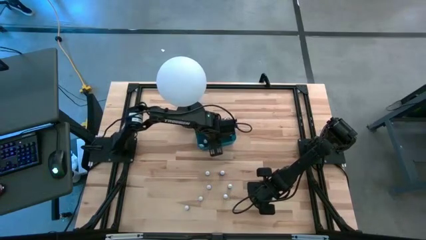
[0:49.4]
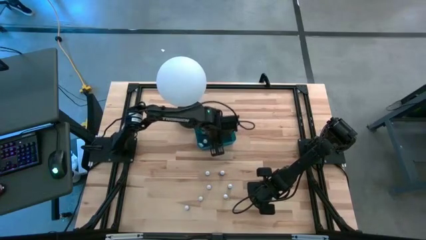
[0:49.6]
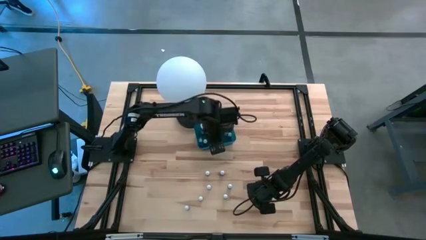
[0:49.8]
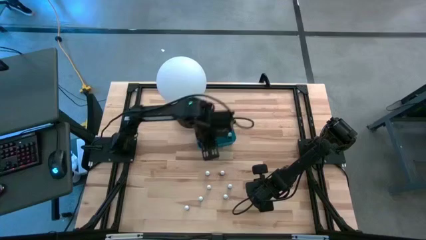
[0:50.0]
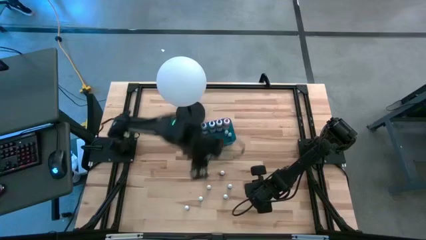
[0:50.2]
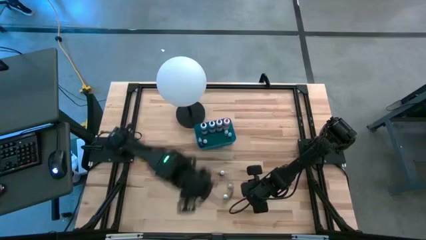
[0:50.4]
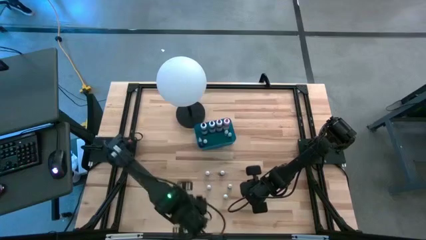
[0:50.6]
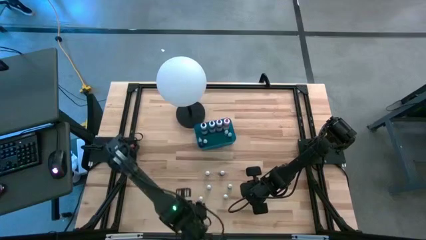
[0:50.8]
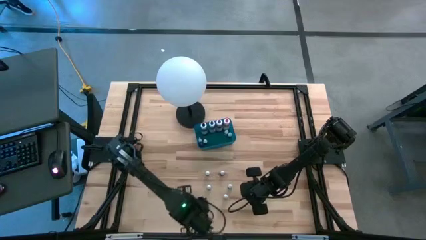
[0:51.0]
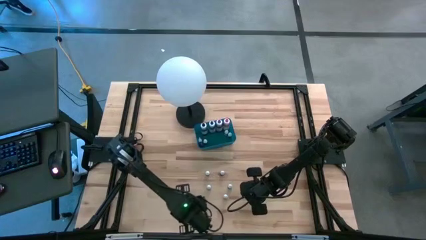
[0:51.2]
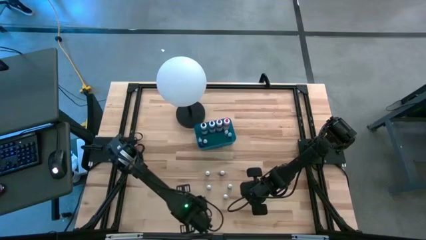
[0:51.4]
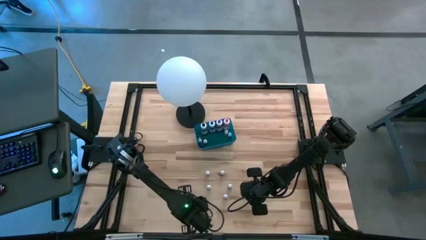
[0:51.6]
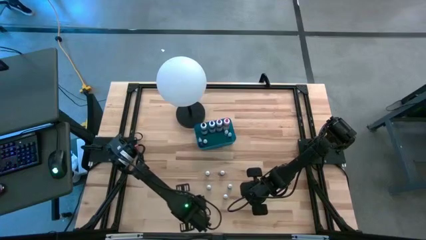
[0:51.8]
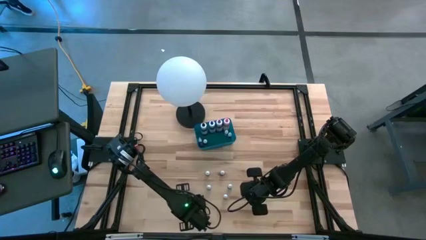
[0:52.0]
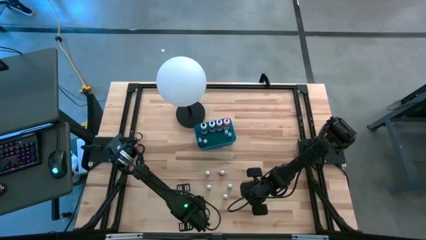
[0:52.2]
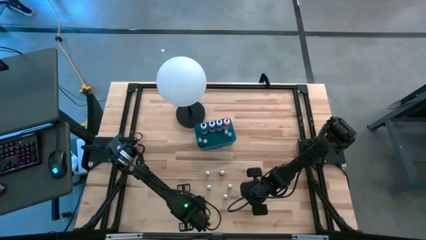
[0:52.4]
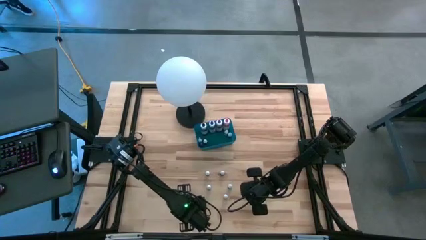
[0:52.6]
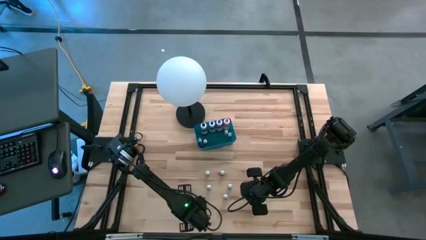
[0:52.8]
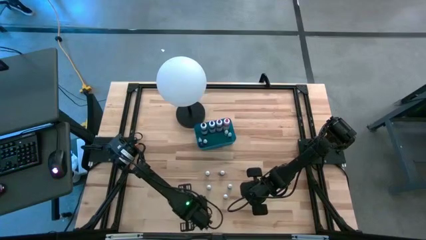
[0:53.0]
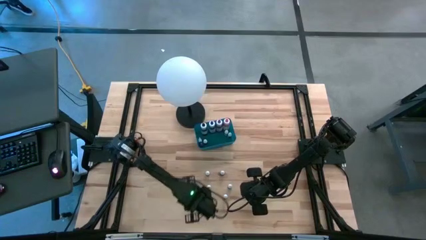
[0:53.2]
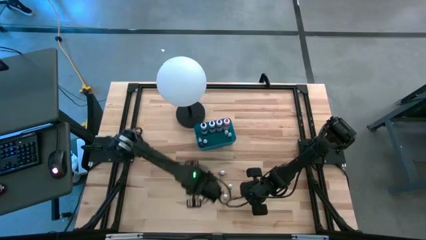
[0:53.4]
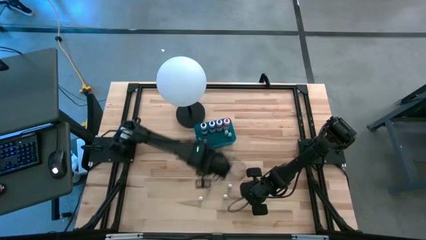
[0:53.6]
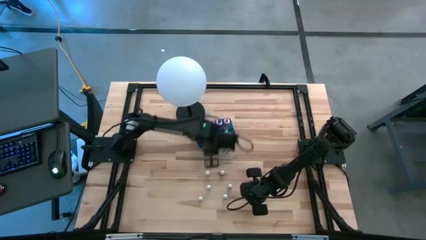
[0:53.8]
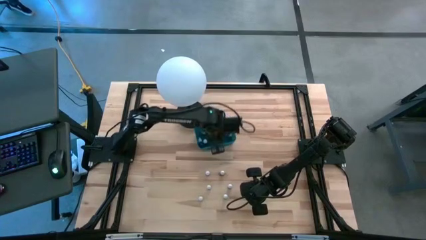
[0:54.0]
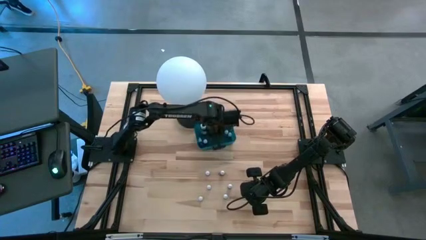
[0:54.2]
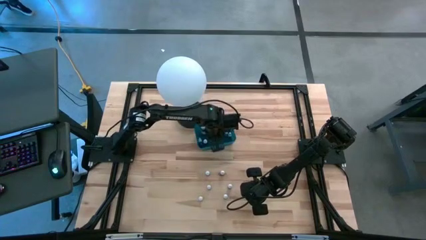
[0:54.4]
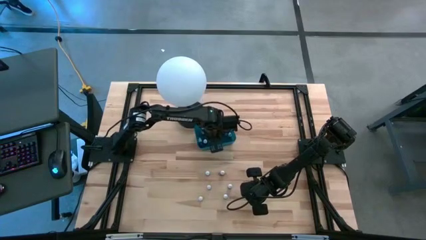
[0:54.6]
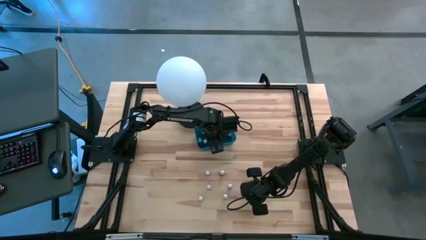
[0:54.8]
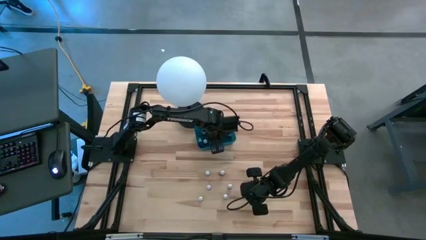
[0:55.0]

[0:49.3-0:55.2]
Task: Pick & Place food coloring
Put the black food coloring bottle into the bin

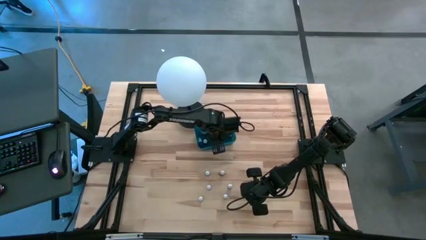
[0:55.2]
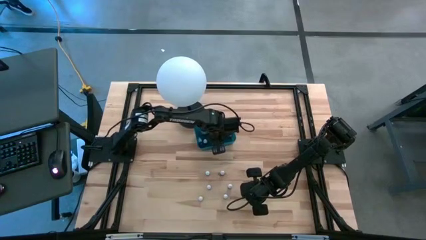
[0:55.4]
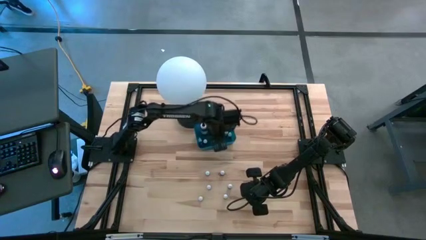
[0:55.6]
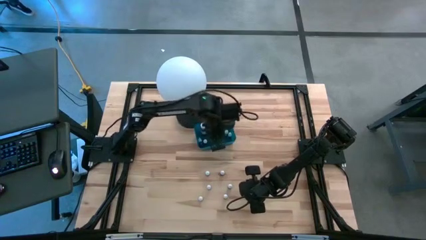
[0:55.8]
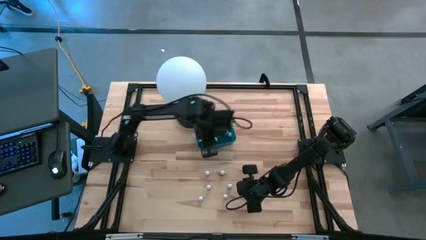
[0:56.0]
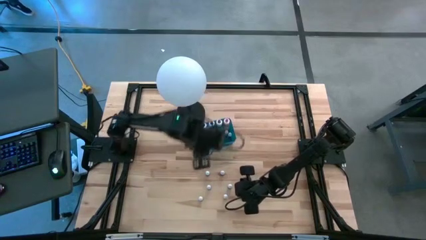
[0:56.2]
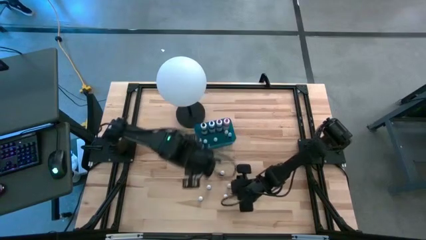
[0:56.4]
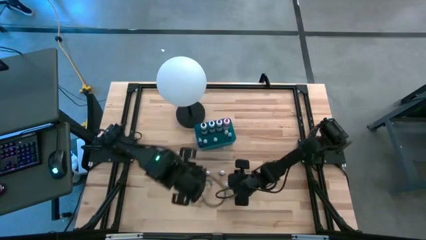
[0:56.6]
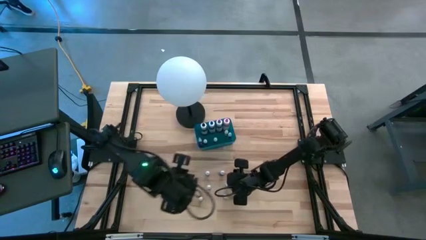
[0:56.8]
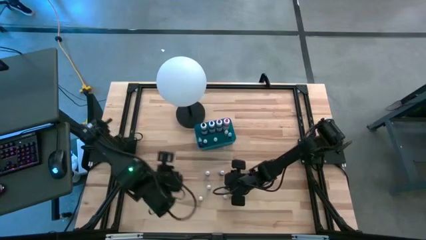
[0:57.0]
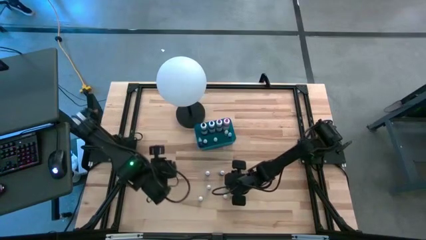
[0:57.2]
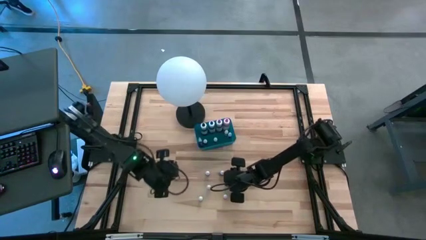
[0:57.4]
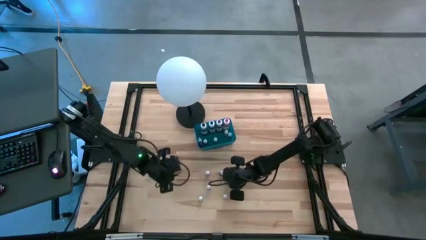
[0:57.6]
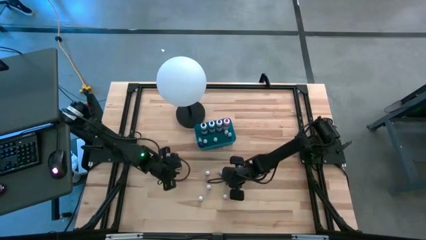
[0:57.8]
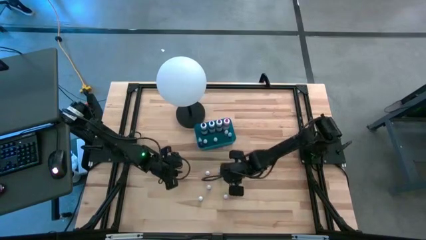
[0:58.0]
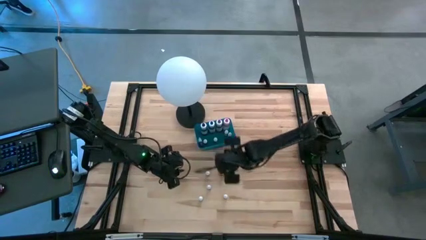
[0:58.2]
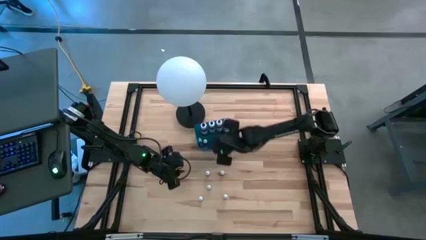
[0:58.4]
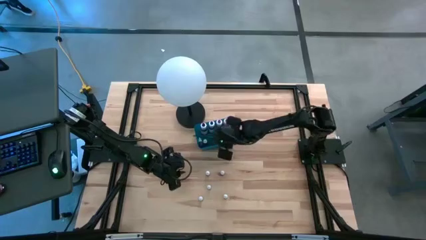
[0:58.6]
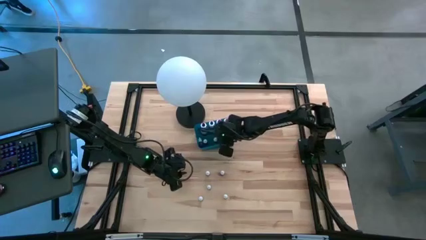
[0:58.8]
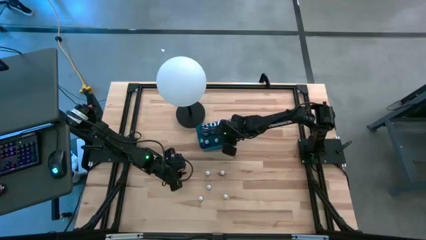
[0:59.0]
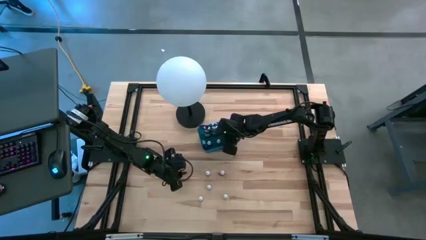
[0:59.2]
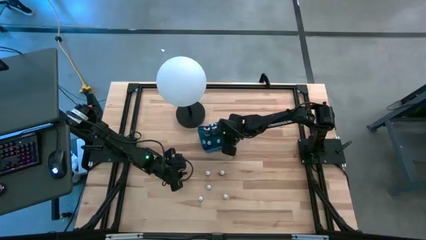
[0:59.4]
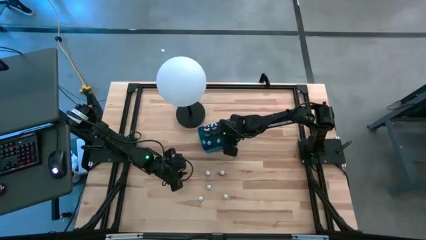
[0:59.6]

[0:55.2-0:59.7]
Put the black food coloring bottle into the bin

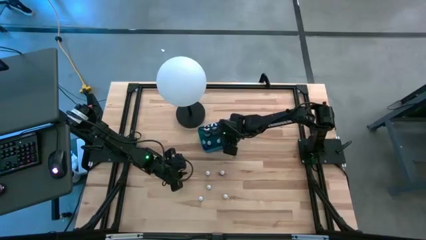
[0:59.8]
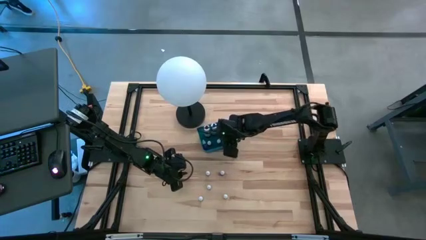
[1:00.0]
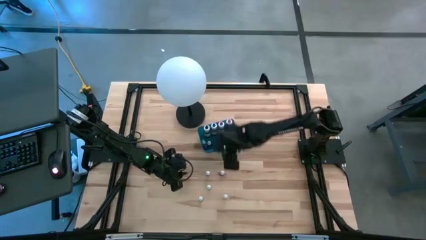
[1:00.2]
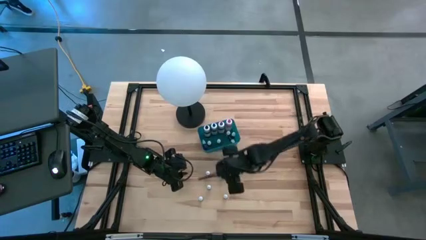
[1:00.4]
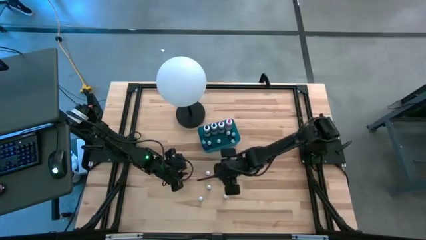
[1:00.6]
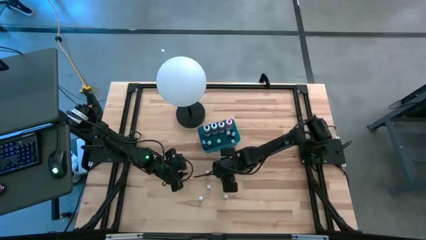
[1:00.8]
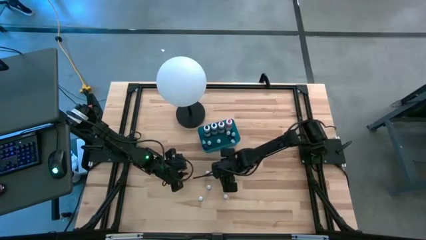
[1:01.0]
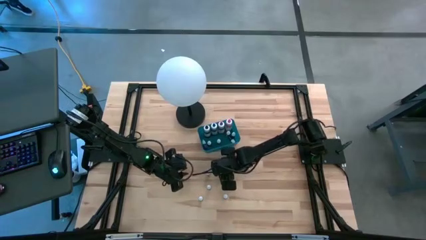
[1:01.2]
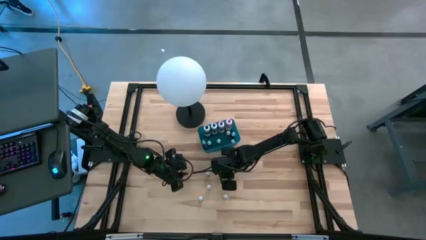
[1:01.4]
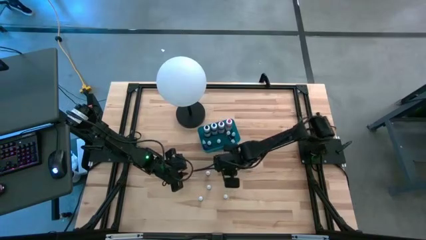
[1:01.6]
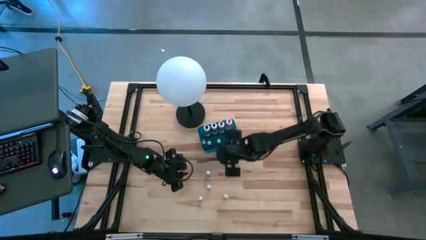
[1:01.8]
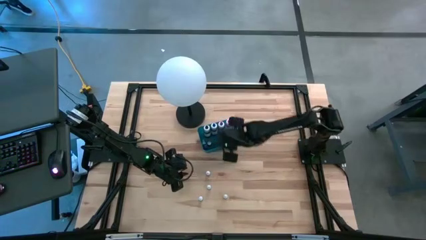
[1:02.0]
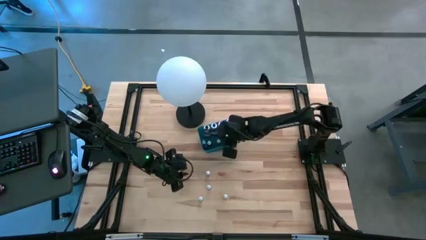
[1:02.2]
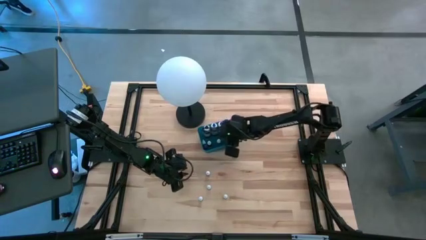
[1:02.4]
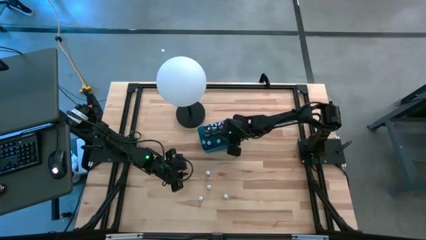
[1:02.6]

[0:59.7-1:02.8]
Put the blue food coloring bottle into the bin

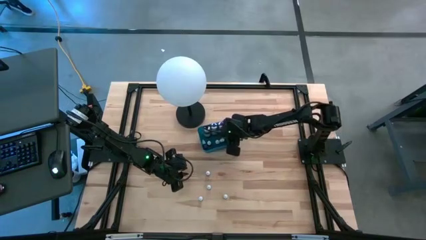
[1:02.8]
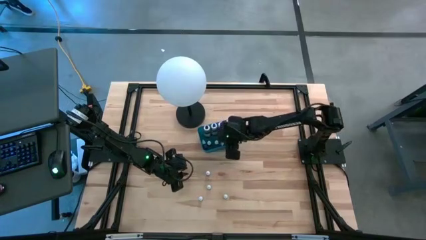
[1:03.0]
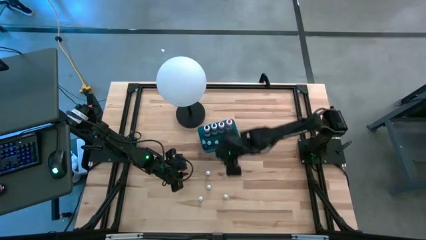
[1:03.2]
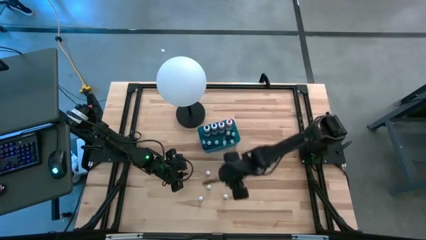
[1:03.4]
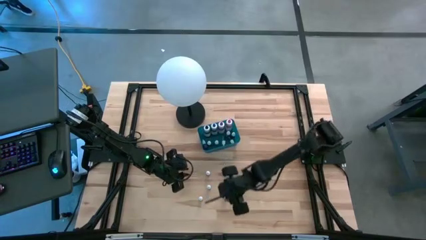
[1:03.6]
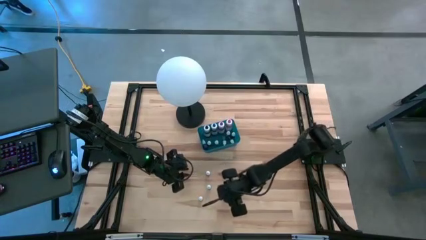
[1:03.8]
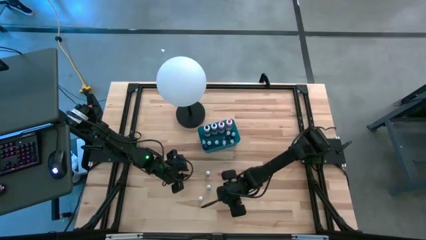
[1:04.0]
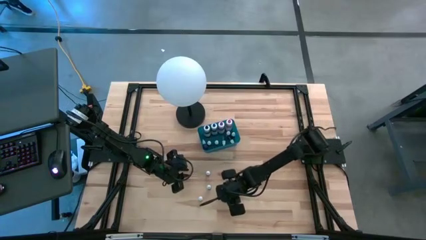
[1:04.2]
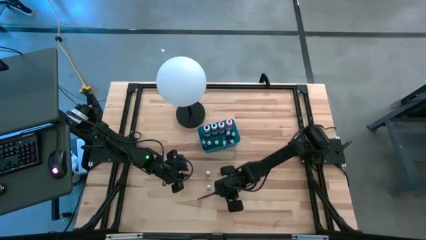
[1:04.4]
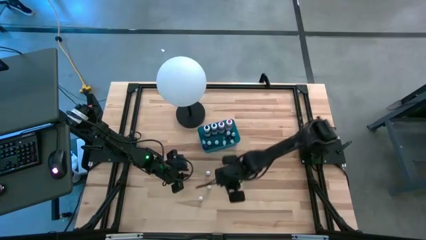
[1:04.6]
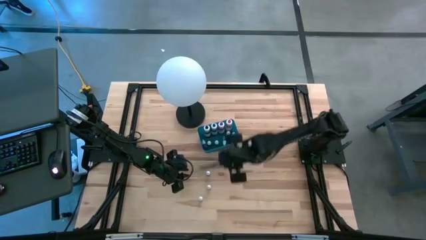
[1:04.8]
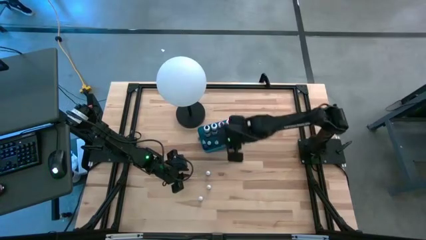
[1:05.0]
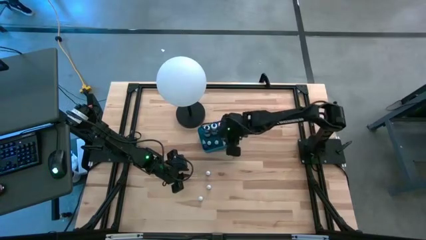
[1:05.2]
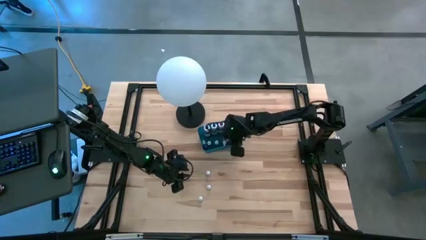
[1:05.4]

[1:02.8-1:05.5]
Put the red food coloring bottle into the bin

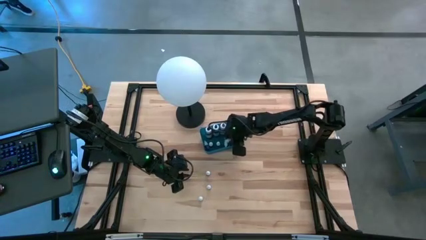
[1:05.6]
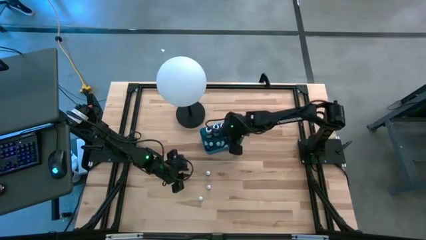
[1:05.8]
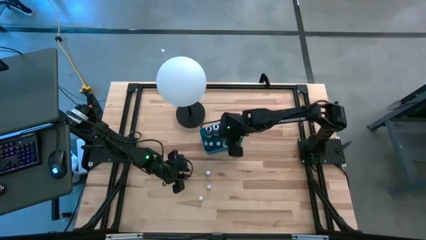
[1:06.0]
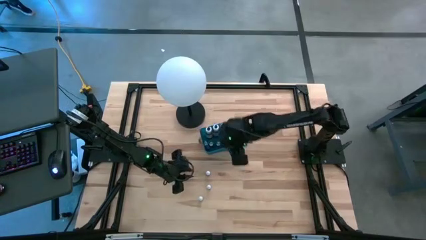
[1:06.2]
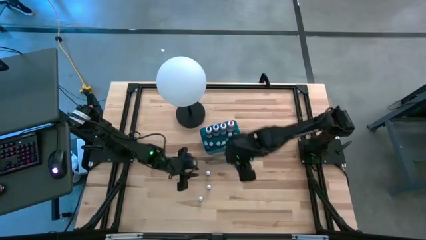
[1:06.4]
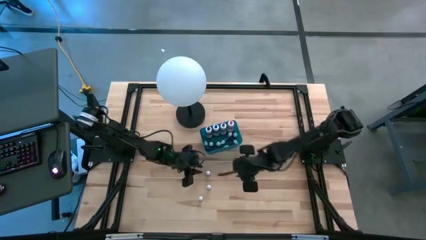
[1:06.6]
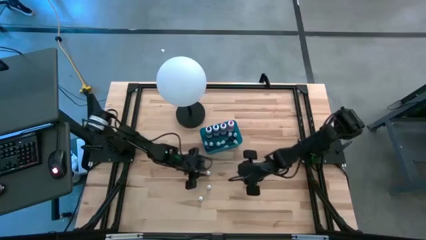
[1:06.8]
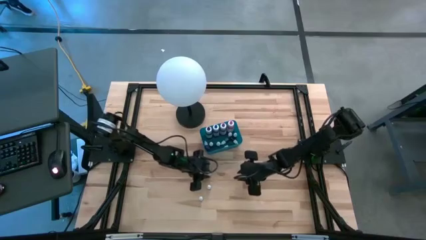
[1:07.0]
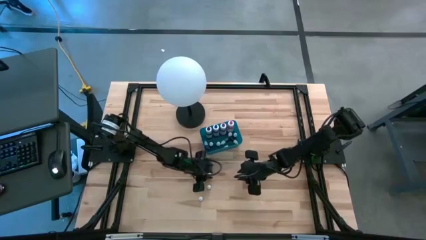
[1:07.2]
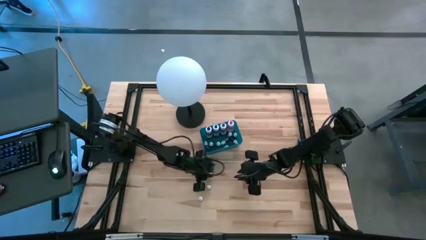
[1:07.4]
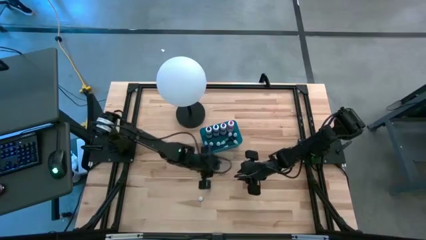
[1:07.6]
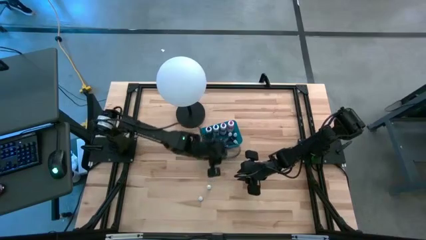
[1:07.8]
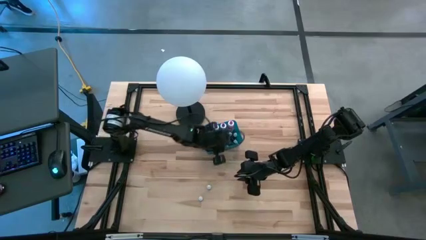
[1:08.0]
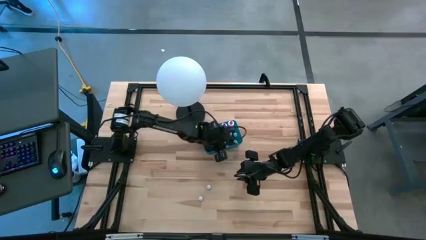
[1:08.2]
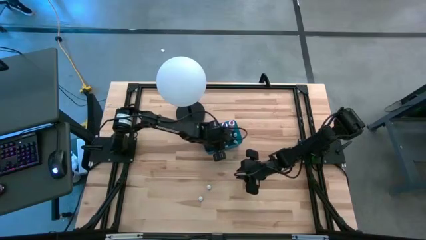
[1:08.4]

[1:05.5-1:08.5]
Put the orange food coloring bottle into the bin
